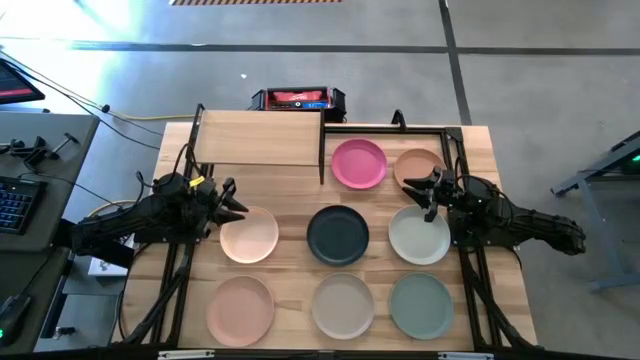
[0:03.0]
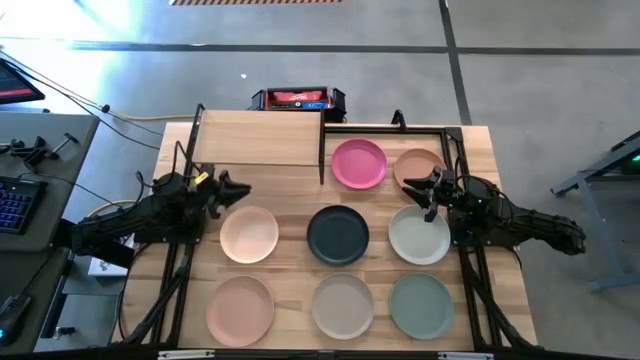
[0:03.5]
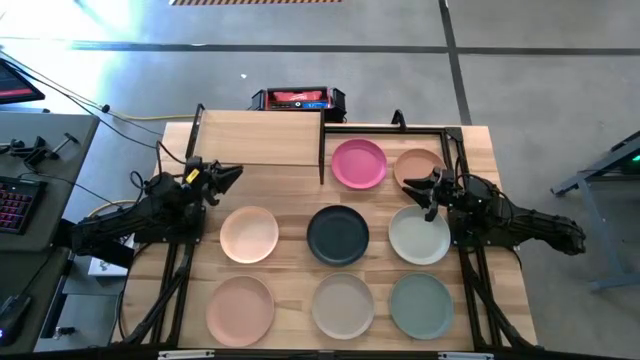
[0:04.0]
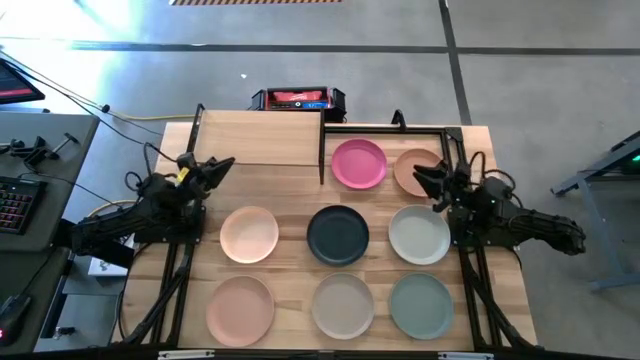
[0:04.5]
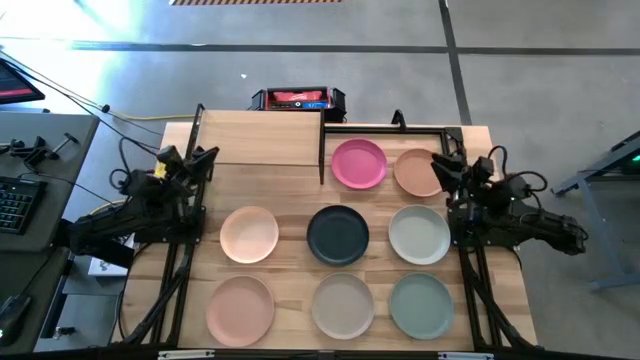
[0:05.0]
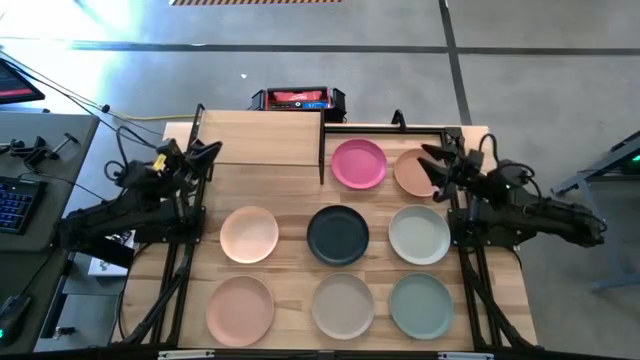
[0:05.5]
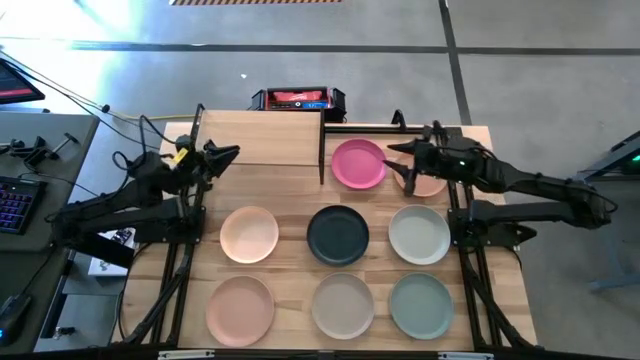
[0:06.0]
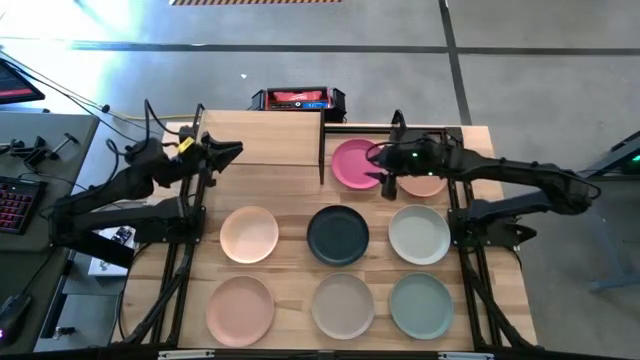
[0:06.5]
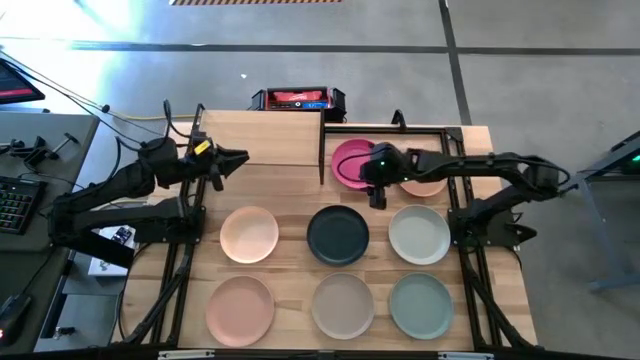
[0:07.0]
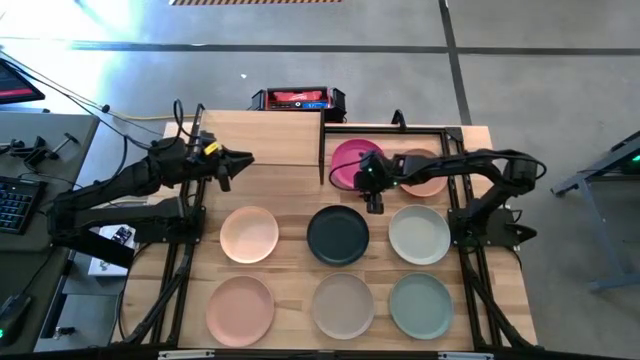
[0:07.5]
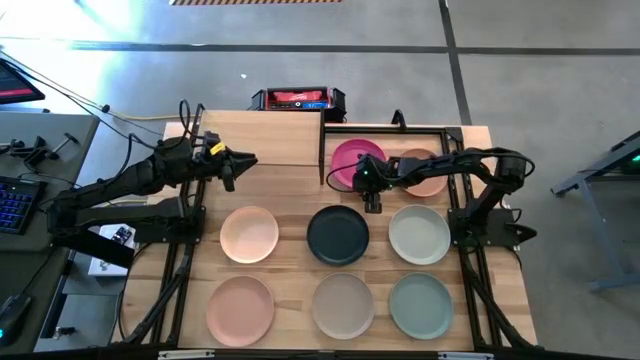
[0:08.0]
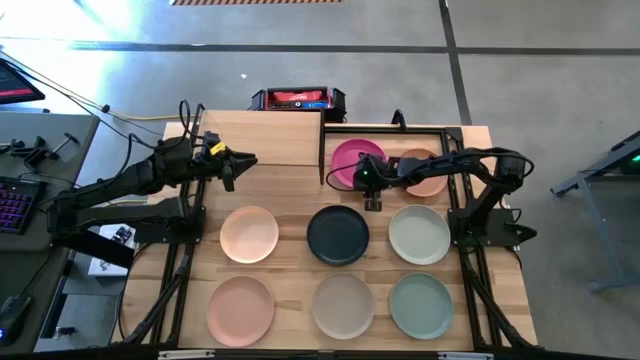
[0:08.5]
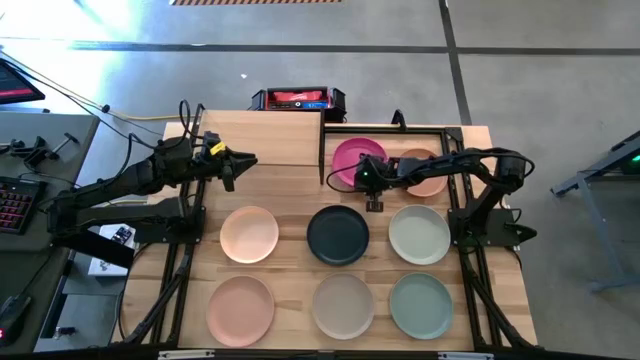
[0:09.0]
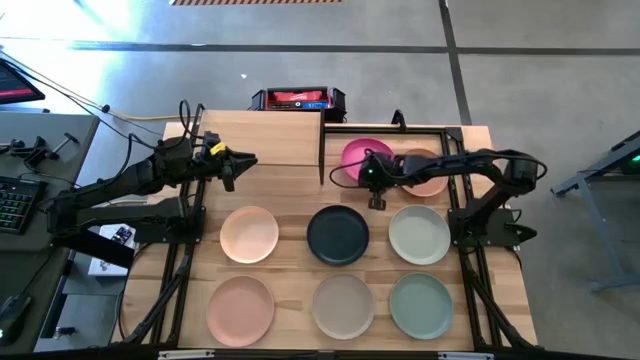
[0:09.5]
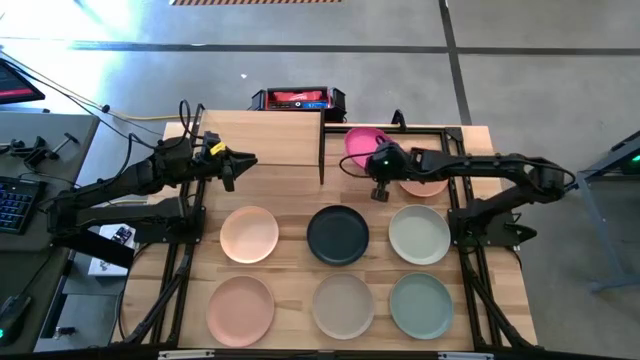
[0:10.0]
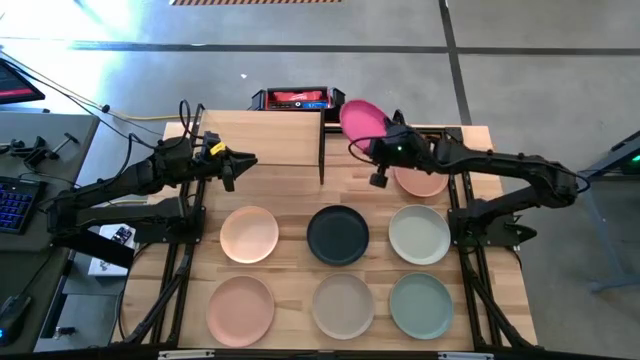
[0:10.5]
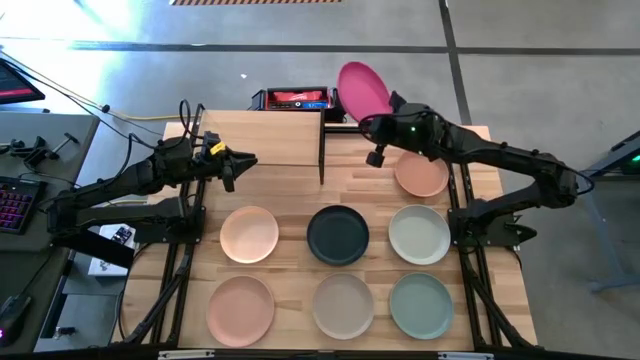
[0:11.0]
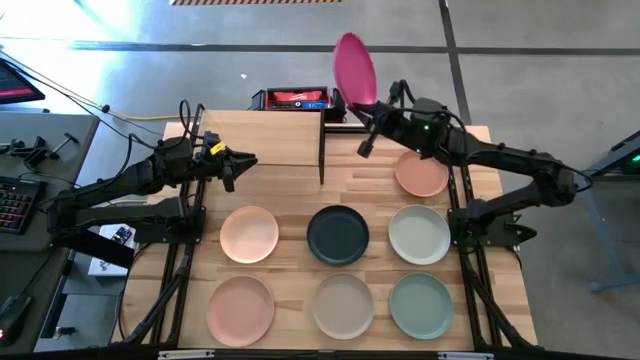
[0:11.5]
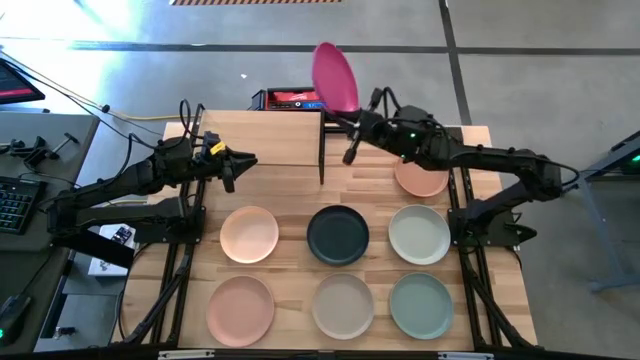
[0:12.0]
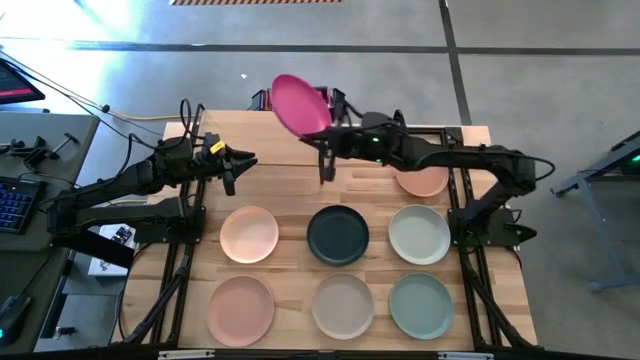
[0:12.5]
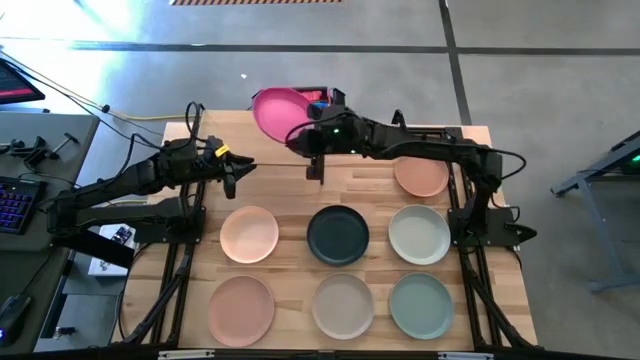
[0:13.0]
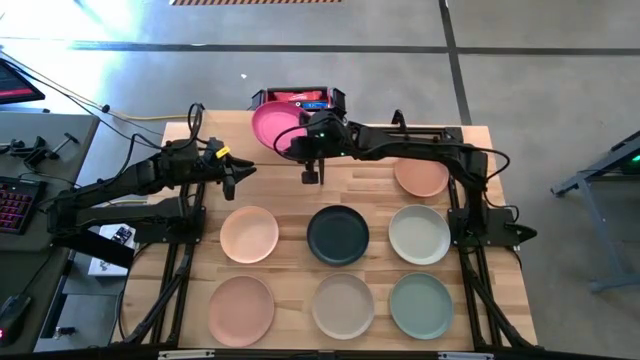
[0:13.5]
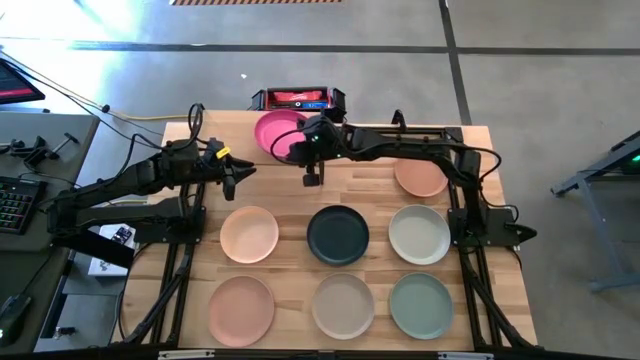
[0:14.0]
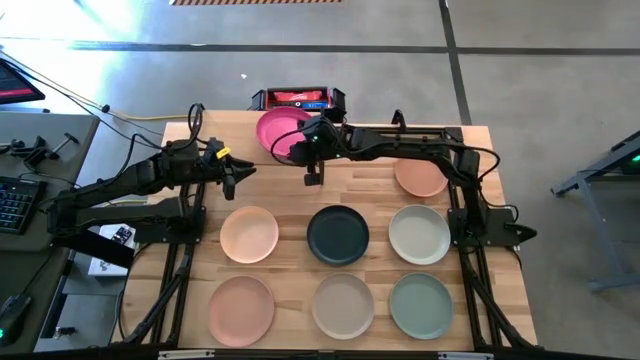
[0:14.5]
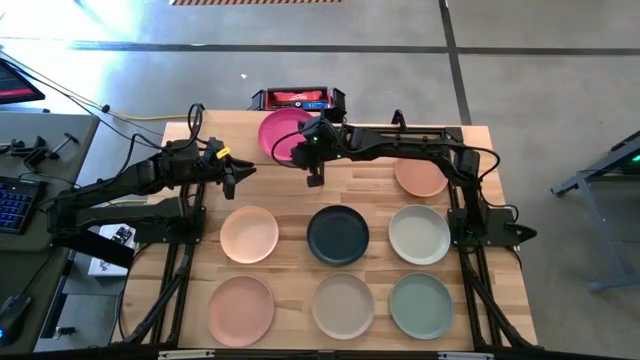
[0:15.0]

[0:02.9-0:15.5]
Task: Place and stack plates onto a shelf
Put the pink plate on the shelf

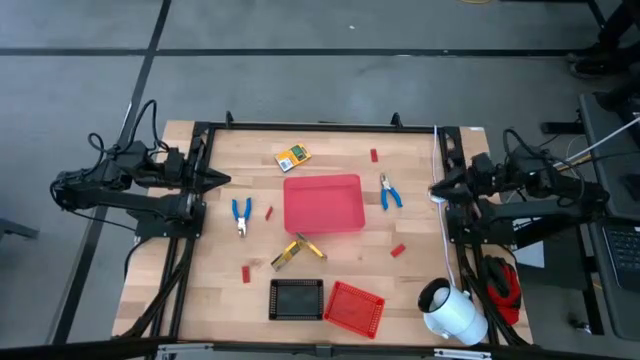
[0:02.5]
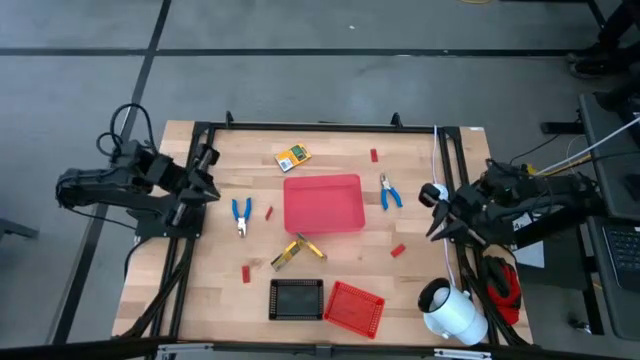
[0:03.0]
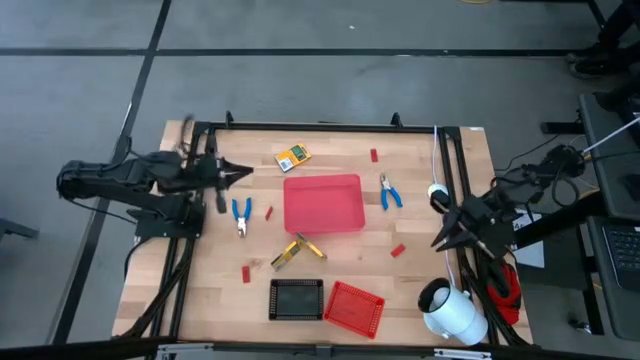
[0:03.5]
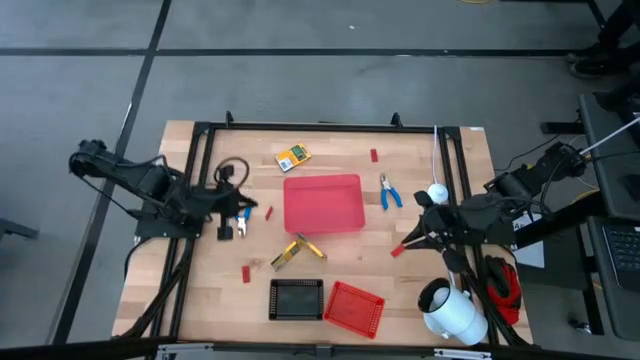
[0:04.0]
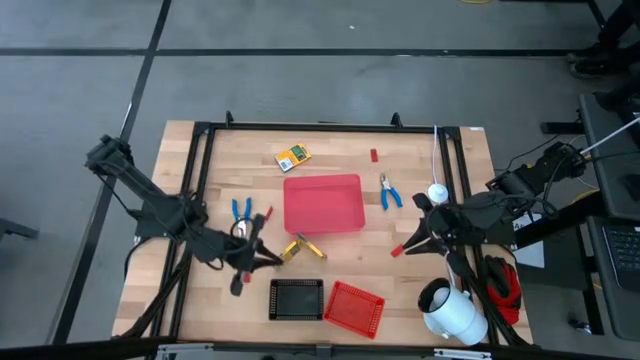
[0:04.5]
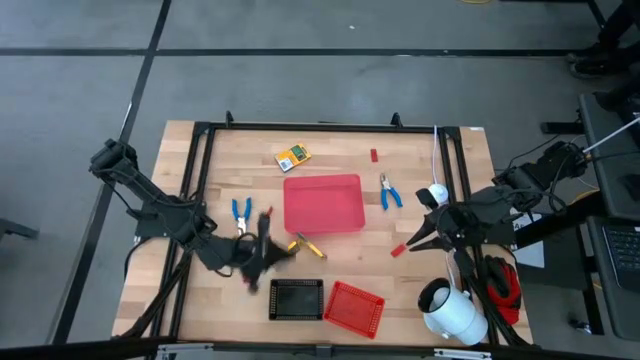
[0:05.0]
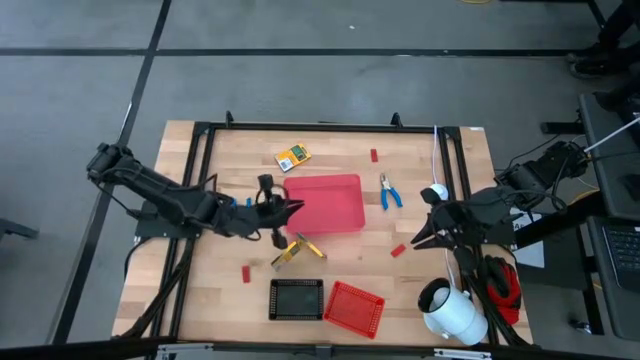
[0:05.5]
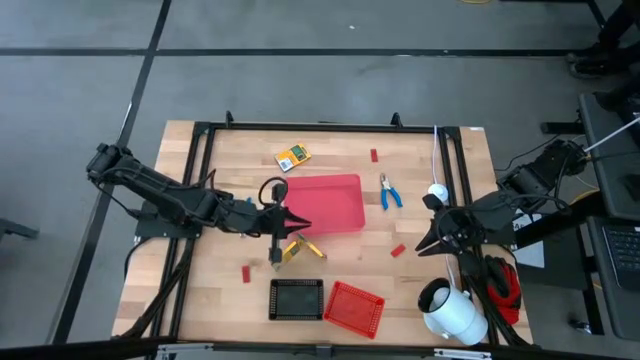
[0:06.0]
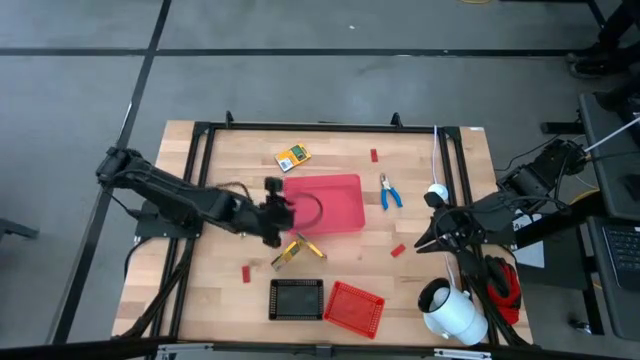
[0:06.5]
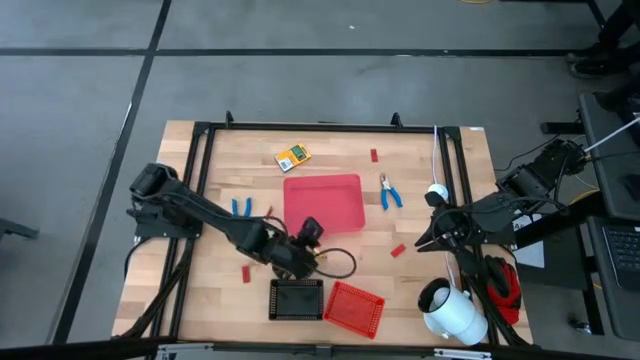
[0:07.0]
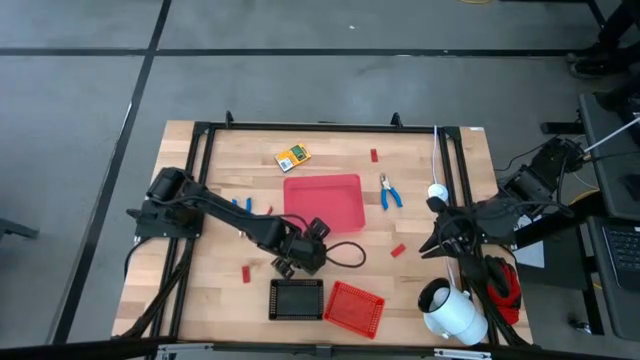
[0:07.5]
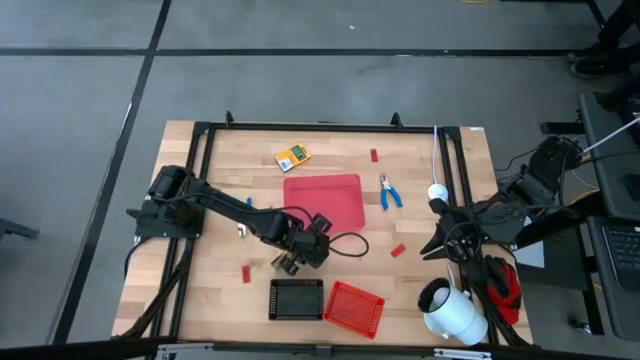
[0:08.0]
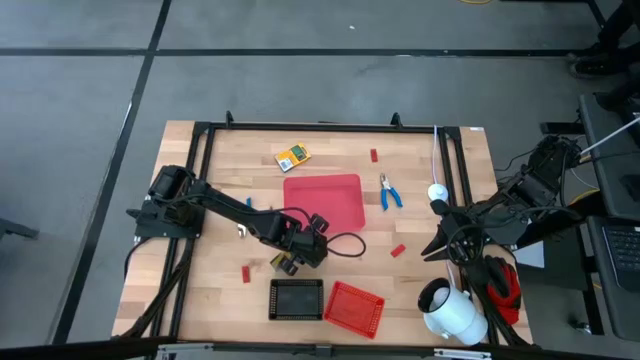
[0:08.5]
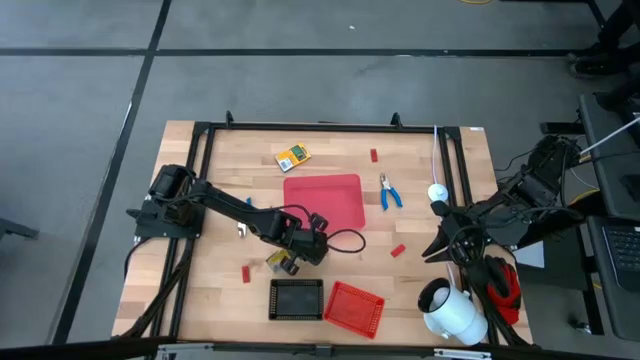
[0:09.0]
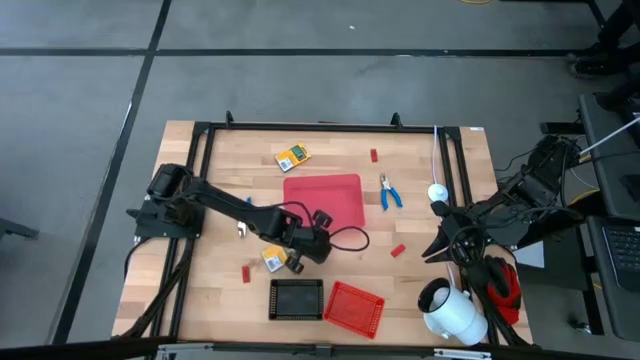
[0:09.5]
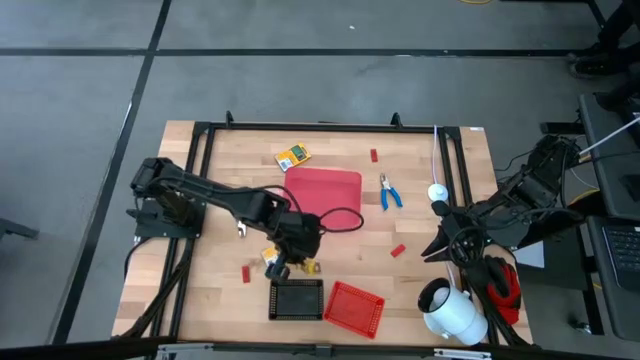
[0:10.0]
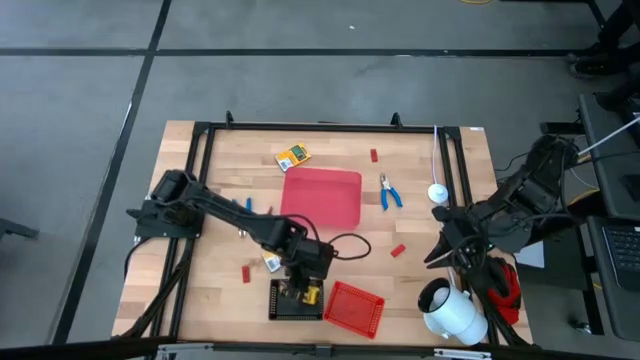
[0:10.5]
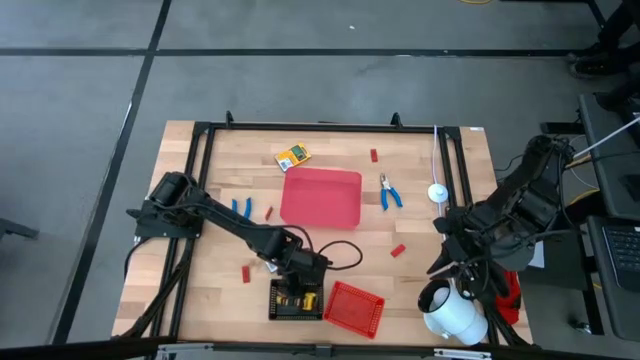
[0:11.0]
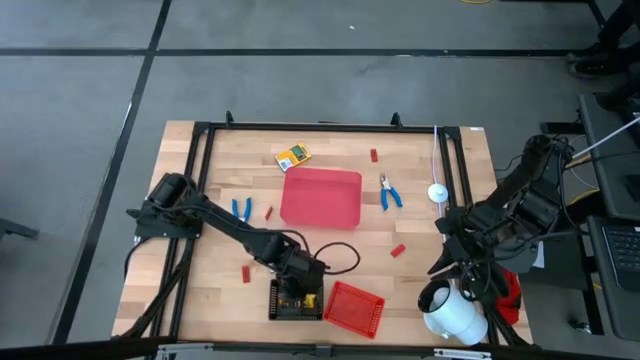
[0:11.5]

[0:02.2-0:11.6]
Task: Pick & Place School Supplies
Put the crayon box into the black bin
